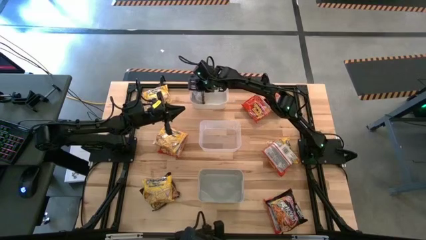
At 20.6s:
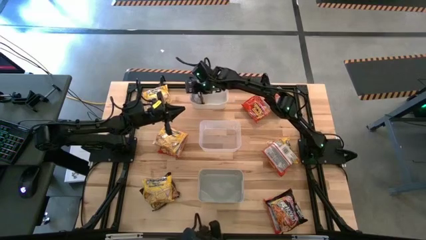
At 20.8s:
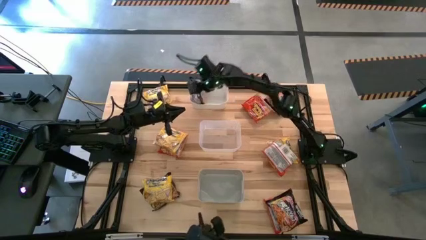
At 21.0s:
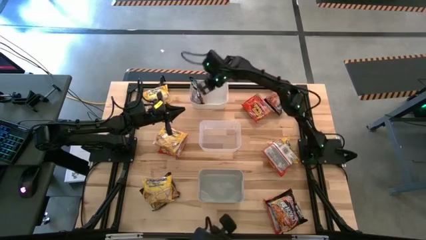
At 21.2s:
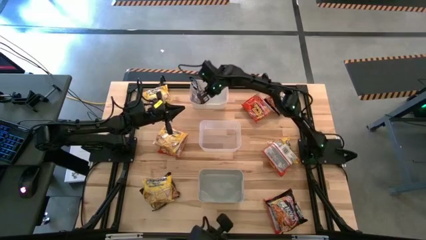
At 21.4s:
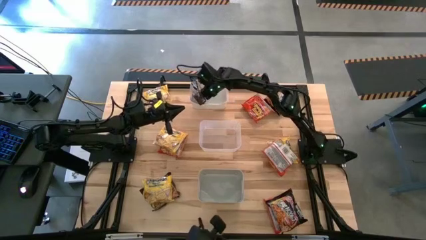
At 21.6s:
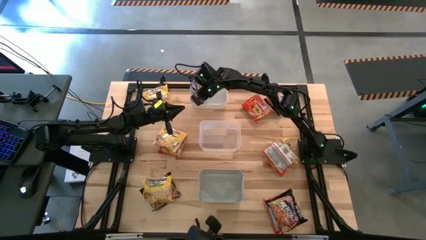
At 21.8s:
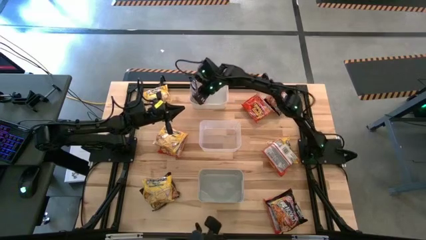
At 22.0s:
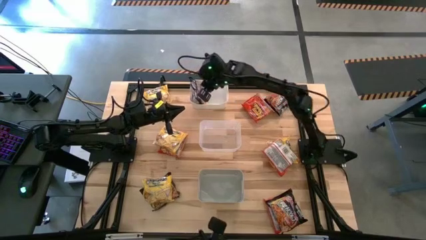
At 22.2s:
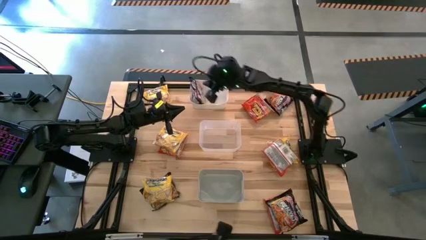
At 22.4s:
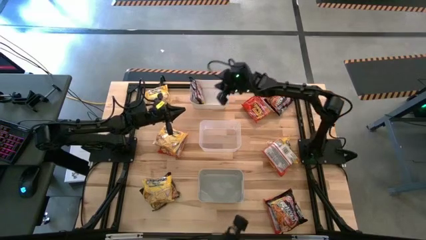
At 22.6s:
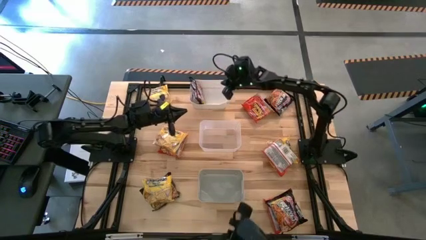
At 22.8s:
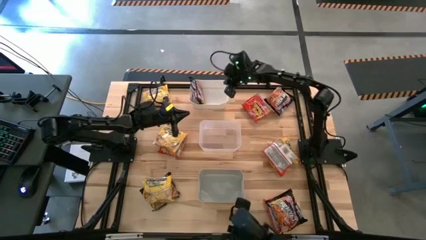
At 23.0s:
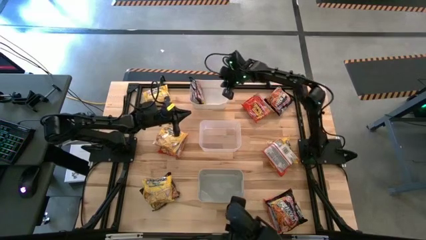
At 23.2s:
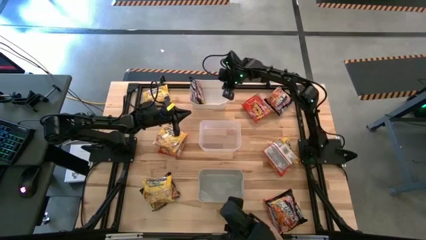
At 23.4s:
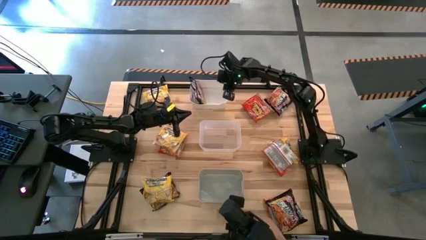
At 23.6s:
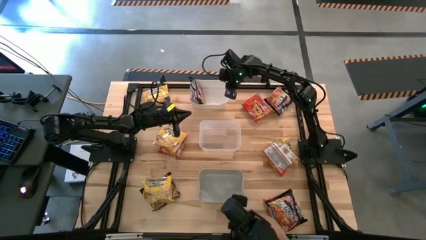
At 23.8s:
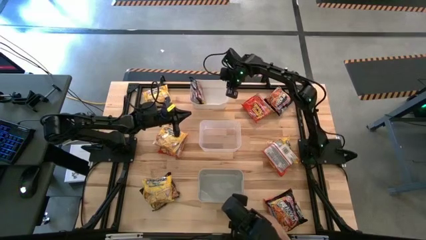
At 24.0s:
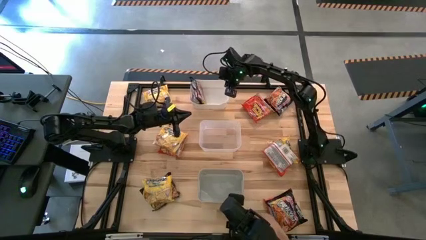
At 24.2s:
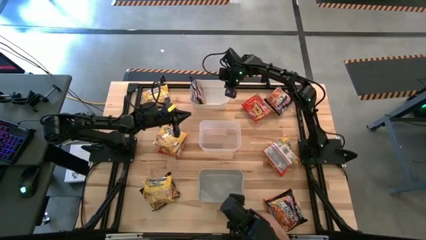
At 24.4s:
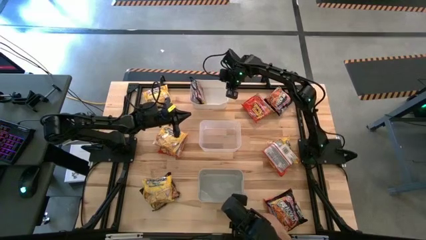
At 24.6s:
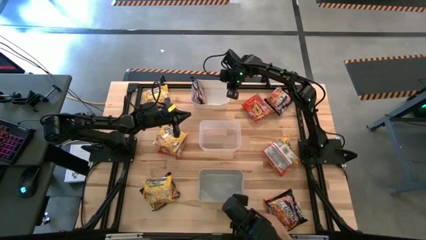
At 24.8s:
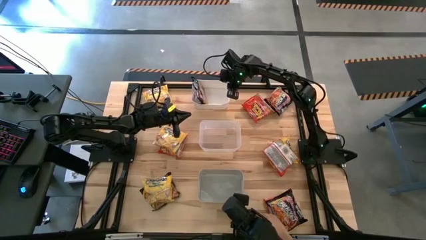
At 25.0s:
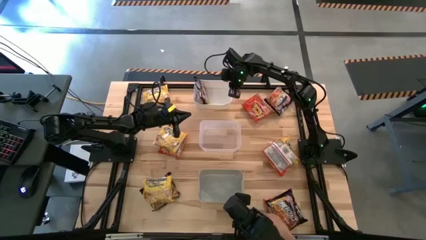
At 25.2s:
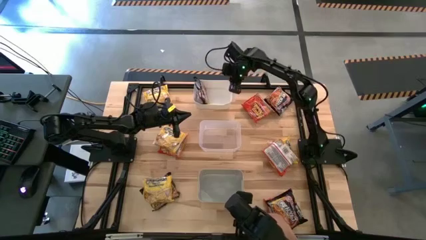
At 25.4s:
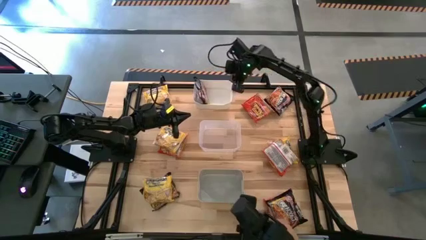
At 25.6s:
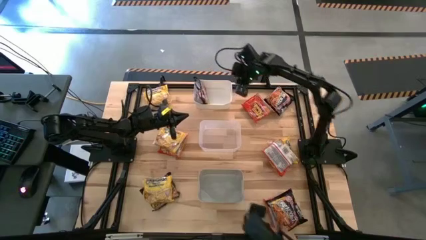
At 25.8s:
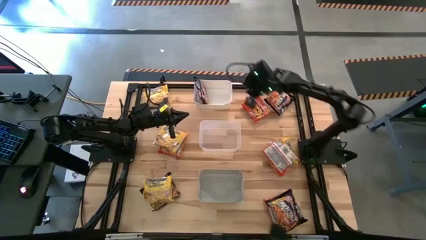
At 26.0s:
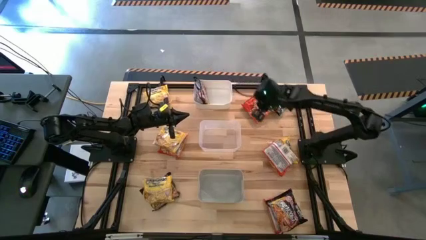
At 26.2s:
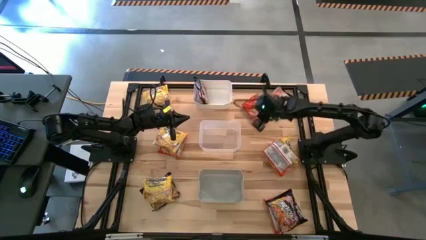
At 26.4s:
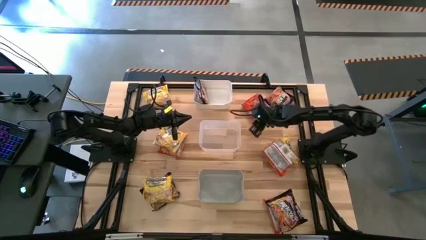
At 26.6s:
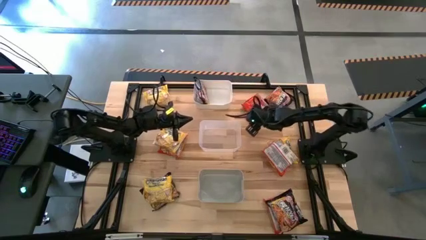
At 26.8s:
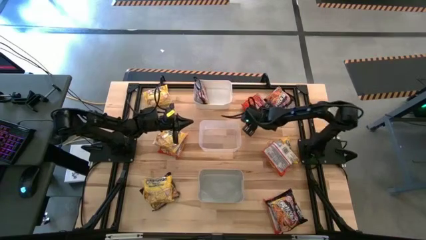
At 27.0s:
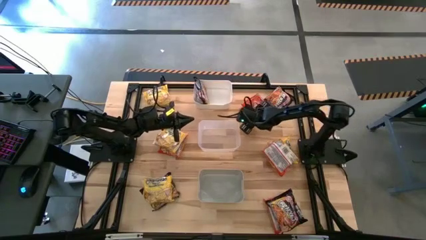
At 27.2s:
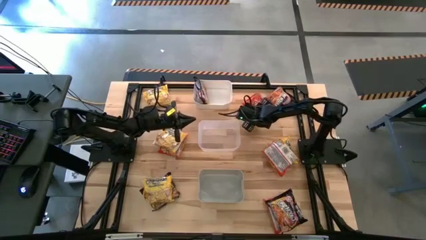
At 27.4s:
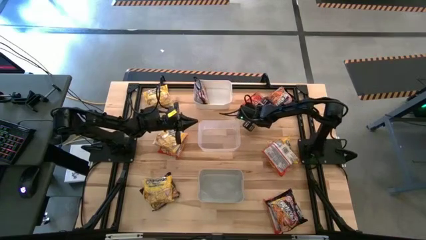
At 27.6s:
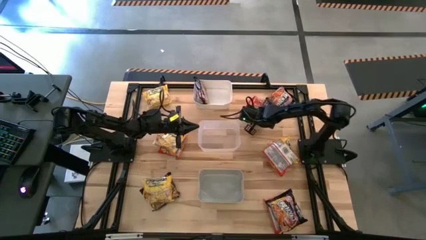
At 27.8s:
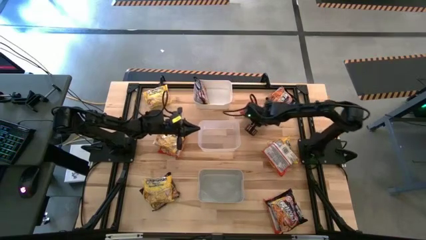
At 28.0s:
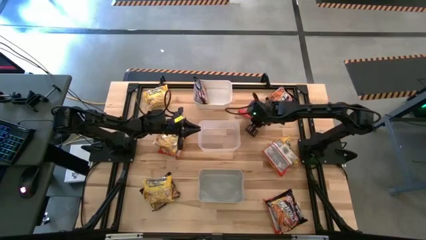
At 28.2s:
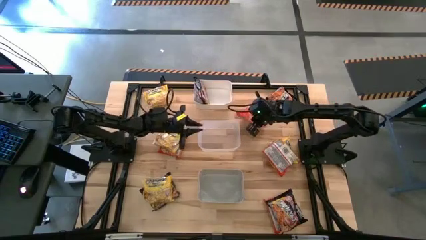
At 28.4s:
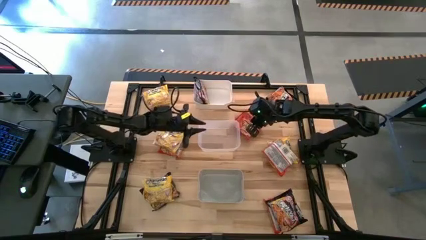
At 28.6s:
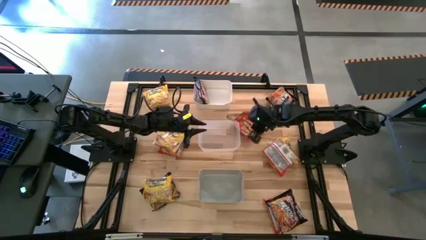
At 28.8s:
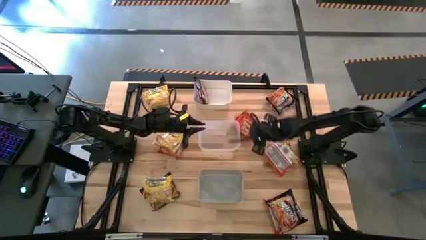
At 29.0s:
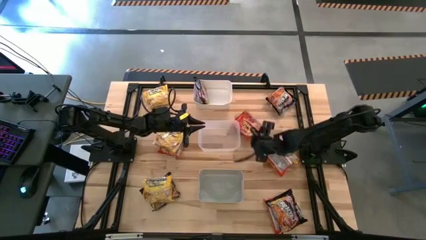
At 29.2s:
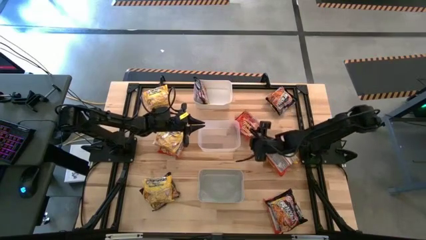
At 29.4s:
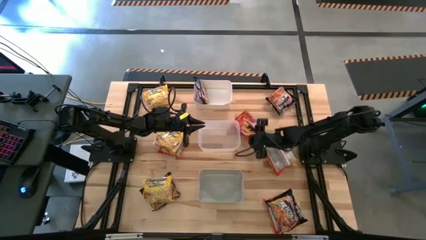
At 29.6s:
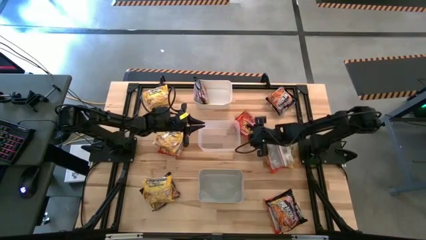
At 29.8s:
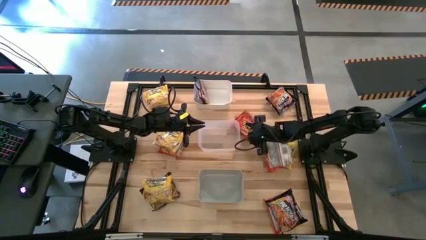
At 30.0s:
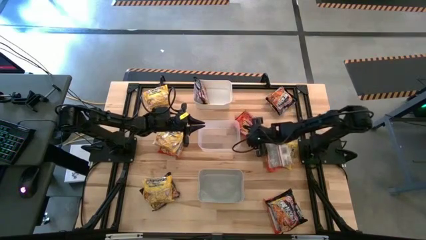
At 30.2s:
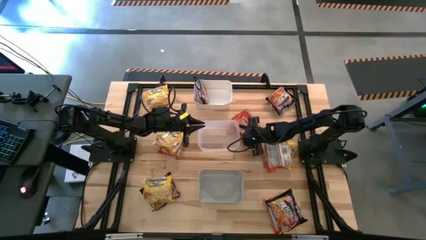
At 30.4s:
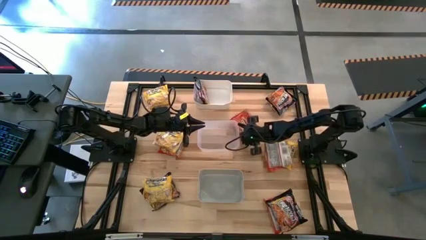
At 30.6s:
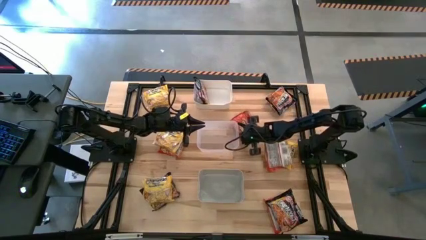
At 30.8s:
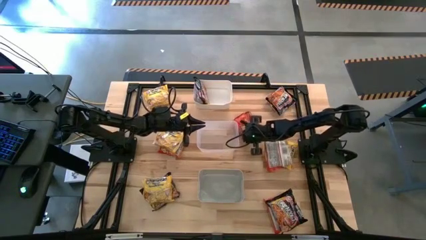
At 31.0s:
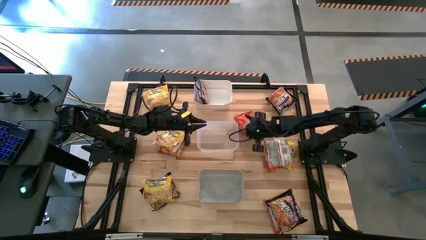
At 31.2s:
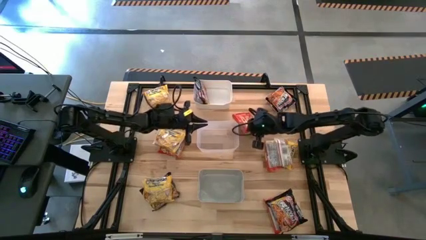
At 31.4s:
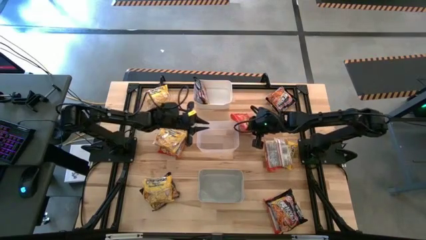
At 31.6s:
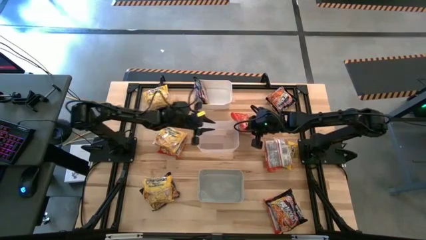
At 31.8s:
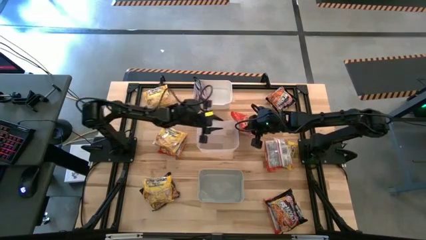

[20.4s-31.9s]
Task: Sort Maruchan noodles
Put the orange noodle pack into the transparent bin
